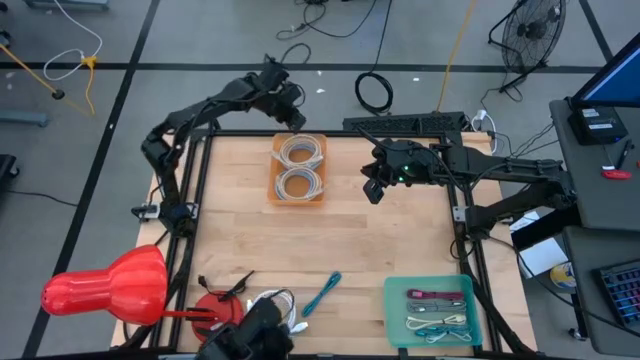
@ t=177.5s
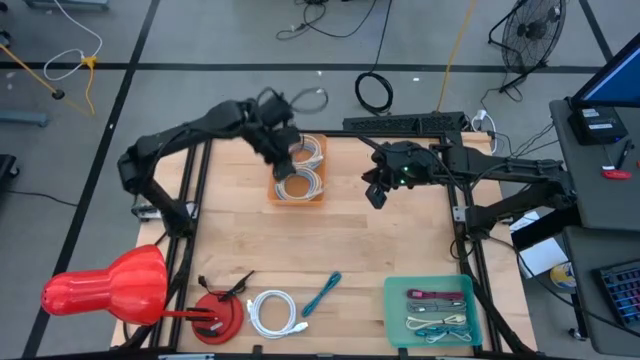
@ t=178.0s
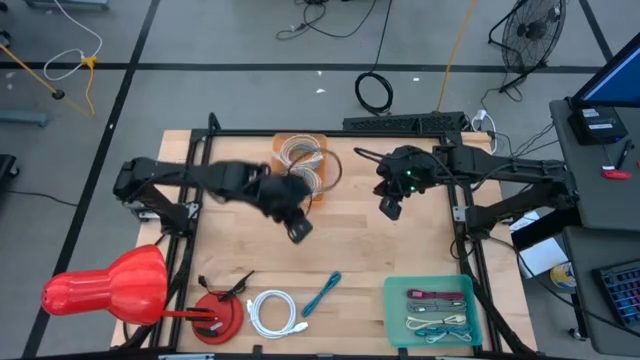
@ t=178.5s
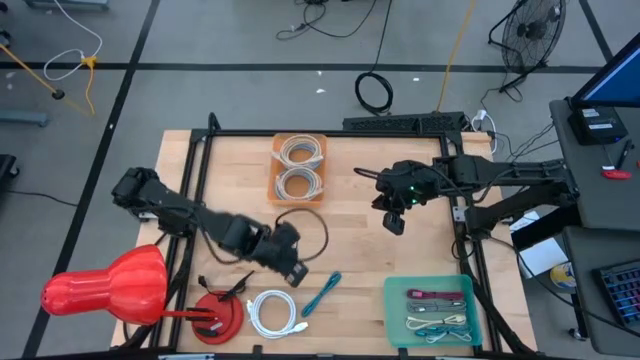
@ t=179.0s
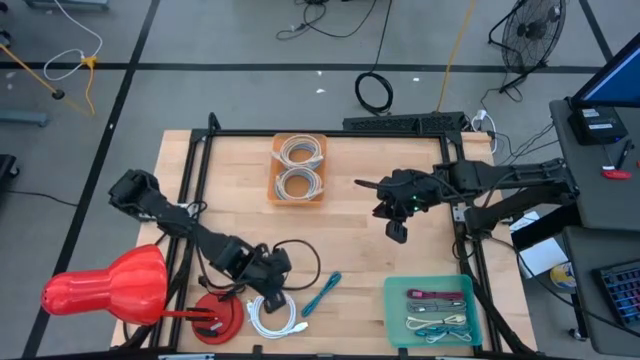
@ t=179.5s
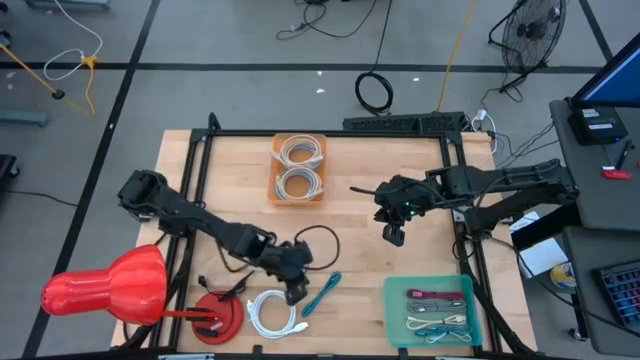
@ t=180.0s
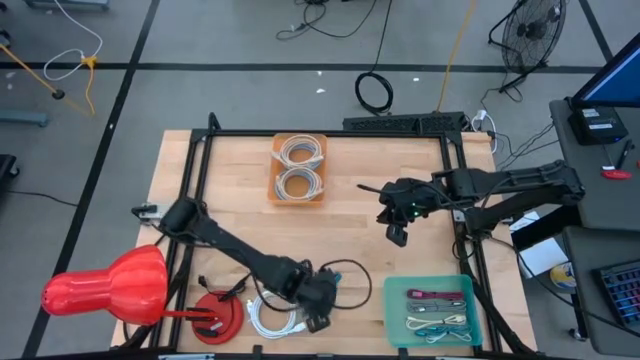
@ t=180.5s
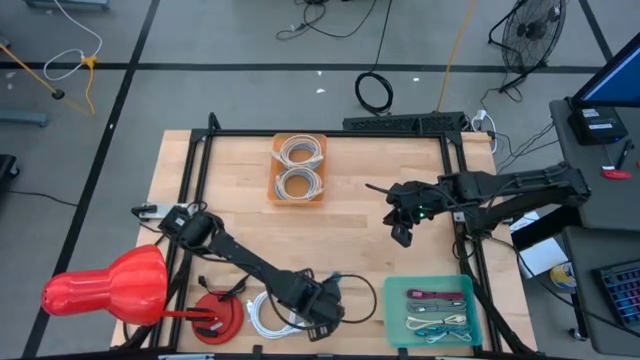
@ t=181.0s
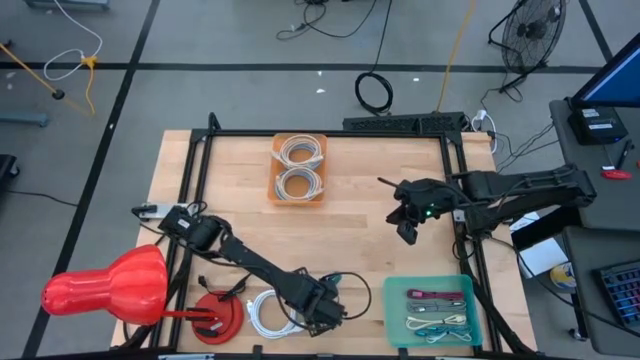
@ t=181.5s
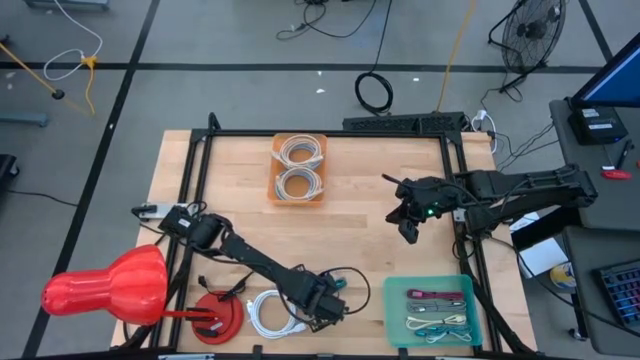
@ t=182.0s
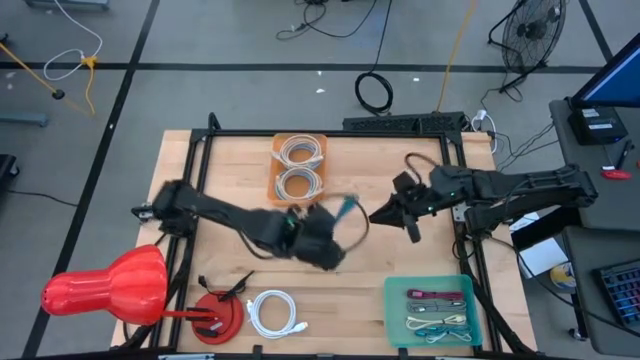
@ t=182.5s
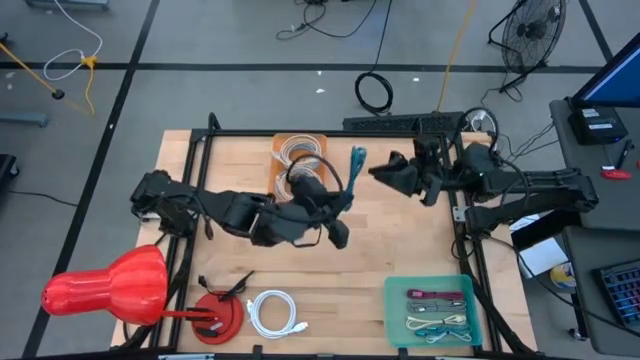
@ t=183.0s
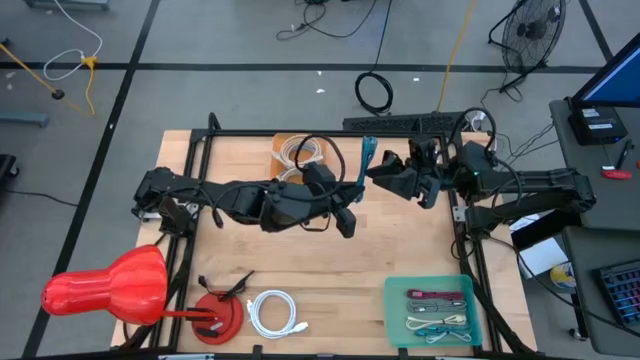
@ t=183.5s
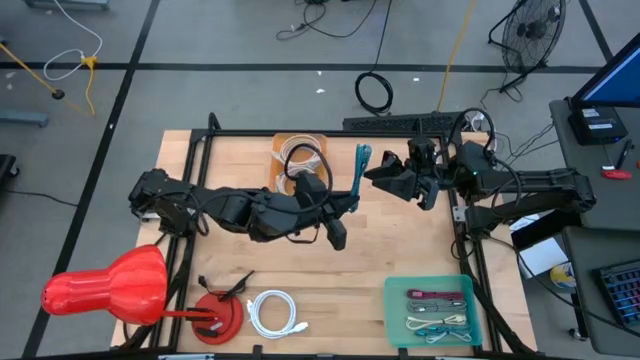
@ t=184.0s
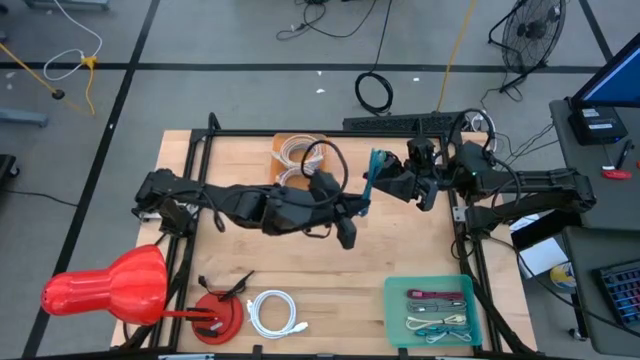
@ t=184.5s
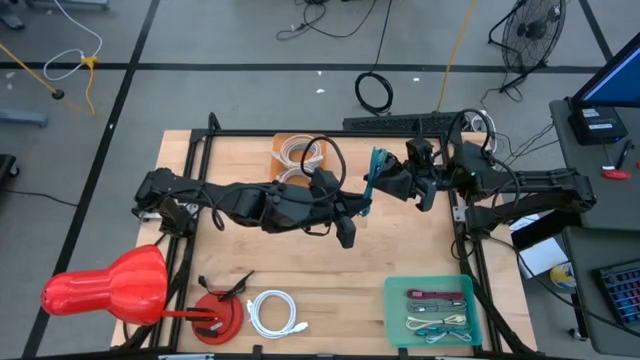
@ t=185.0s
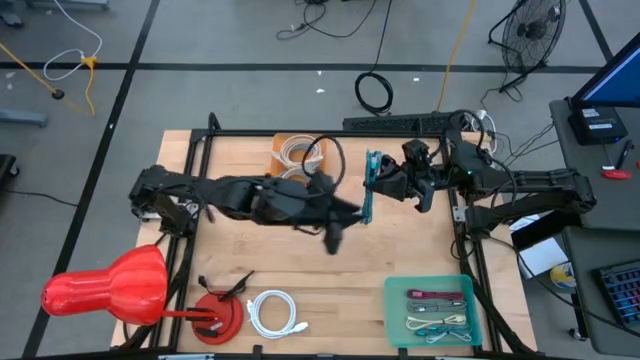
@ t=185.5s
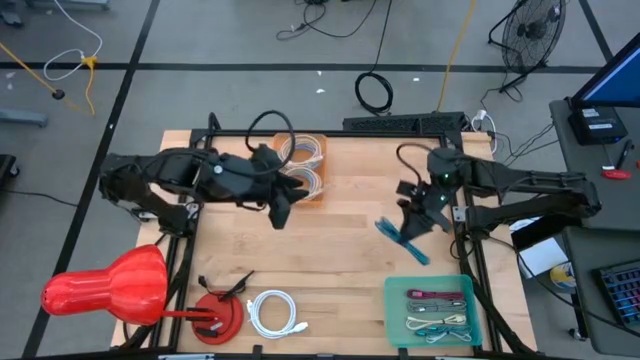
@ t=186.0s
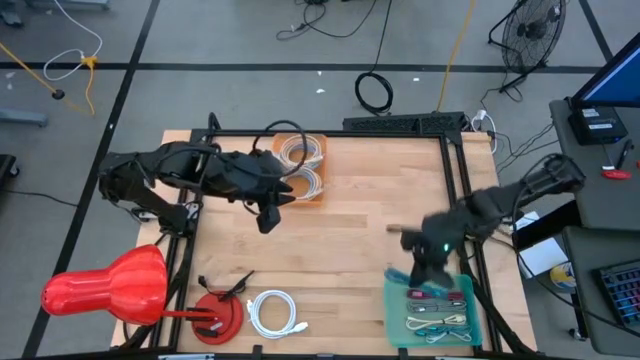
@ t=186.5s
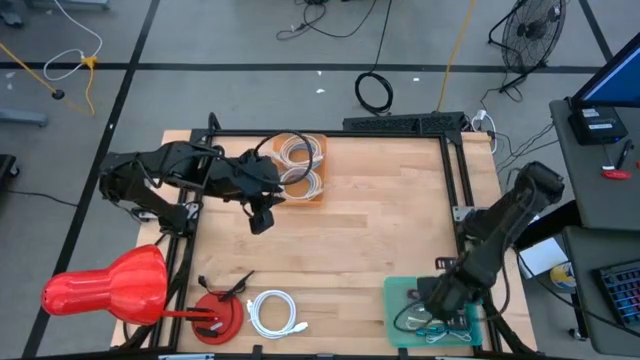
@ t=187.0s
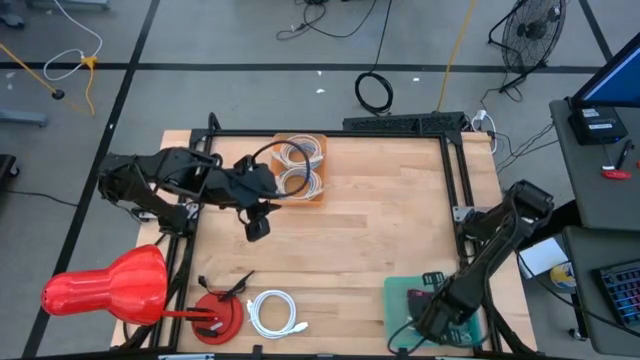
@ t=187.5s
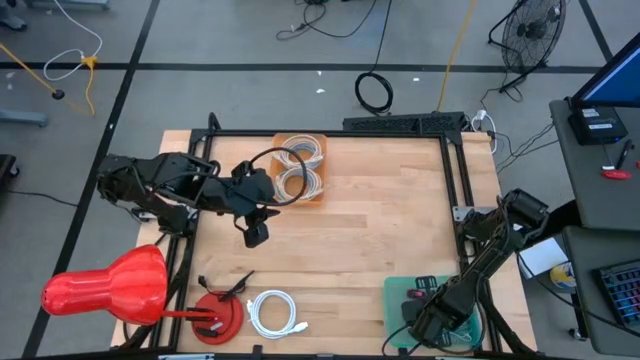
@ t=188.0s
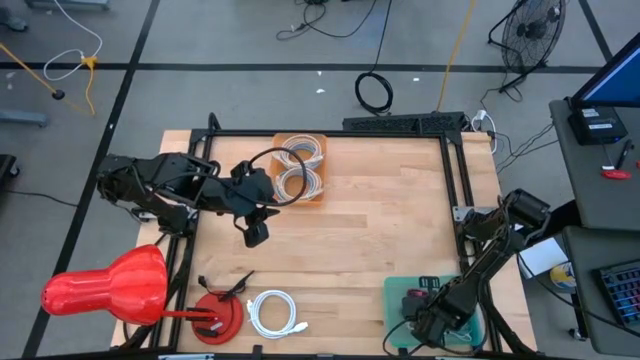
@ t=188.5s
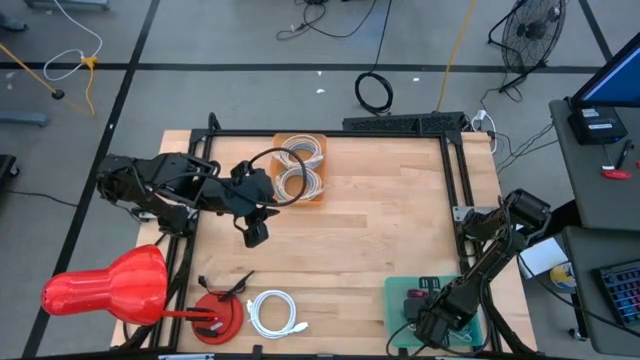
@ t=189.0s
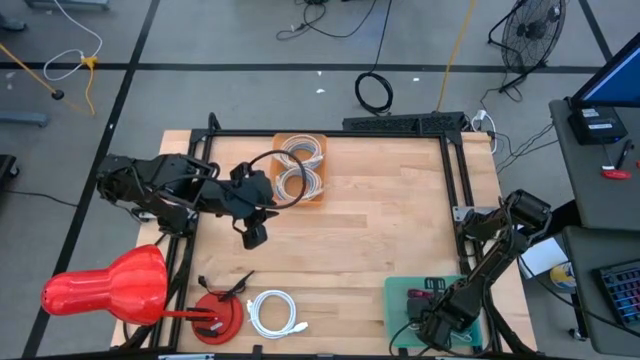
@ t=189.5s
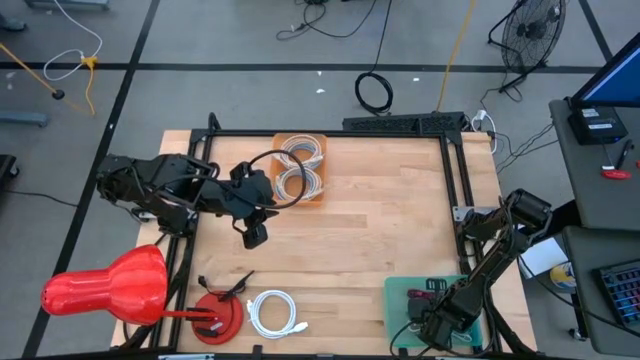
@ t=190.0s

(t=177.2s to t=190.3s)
Task: Pick & Place USB Port
Put the blue patterned usb cable into the blue bin
